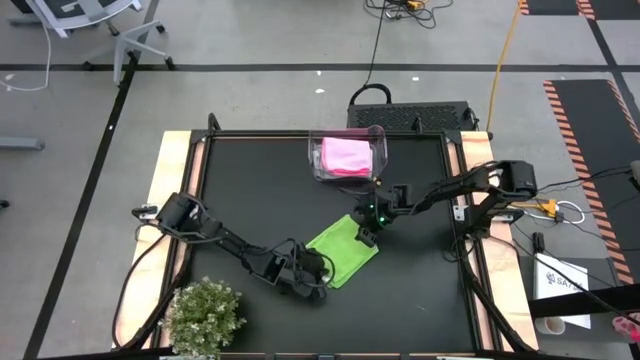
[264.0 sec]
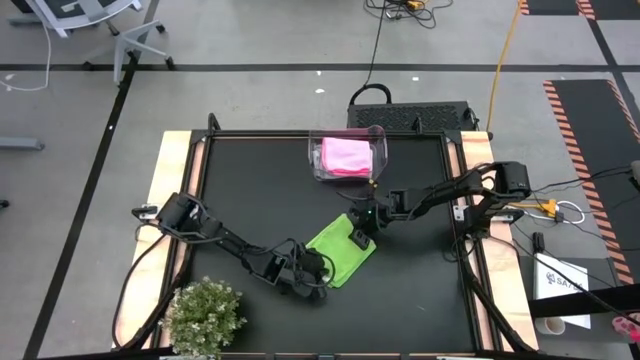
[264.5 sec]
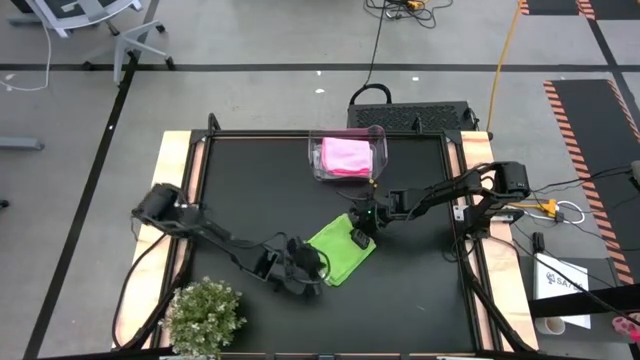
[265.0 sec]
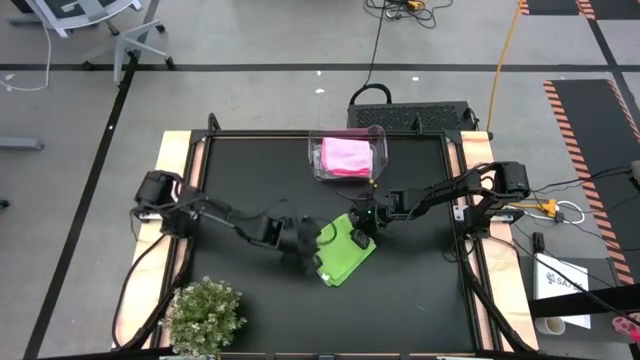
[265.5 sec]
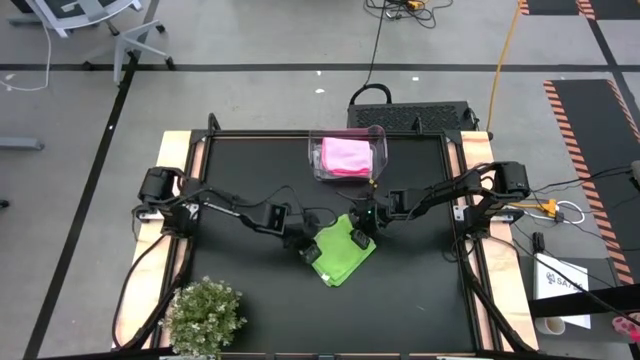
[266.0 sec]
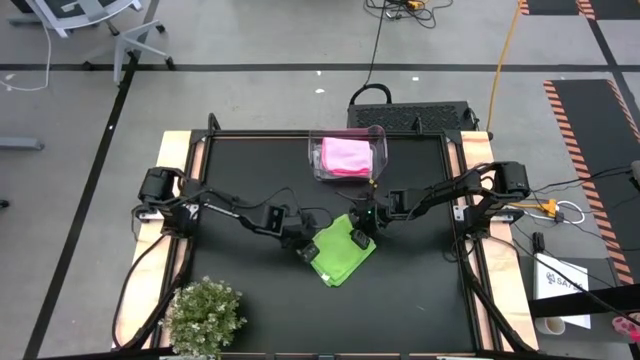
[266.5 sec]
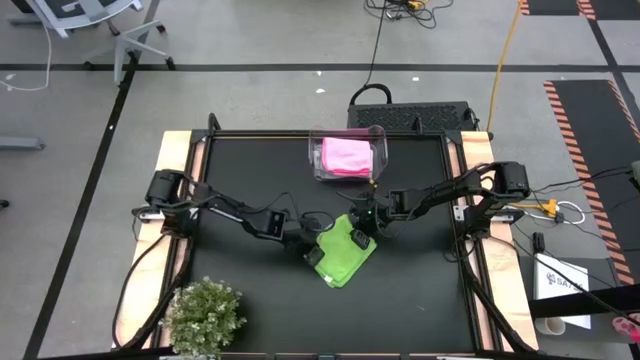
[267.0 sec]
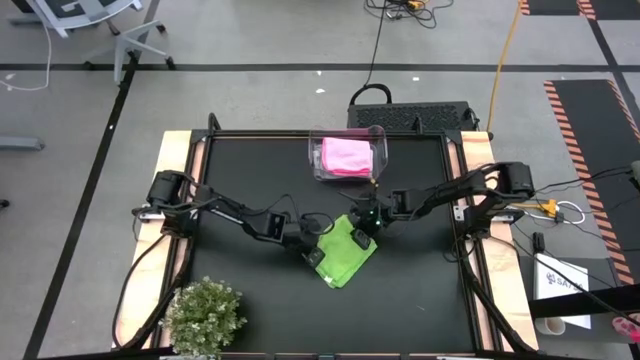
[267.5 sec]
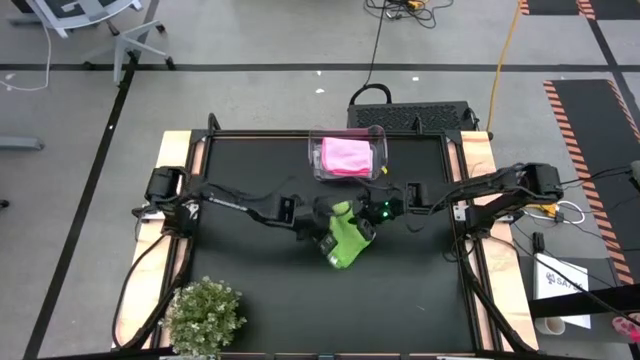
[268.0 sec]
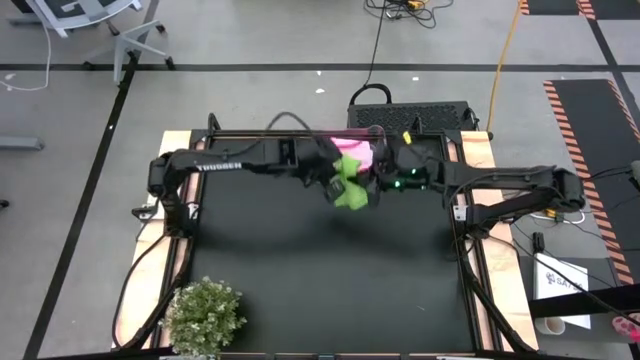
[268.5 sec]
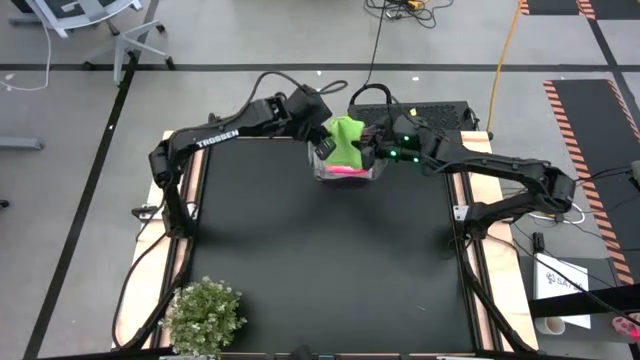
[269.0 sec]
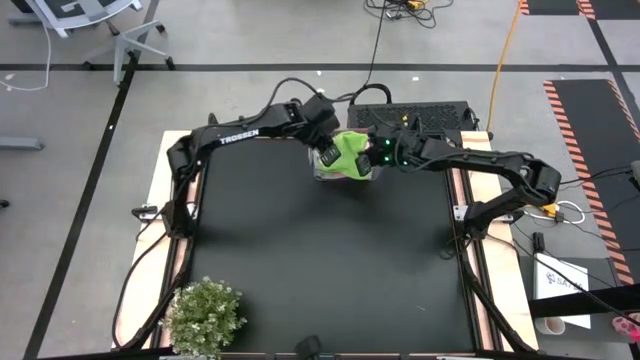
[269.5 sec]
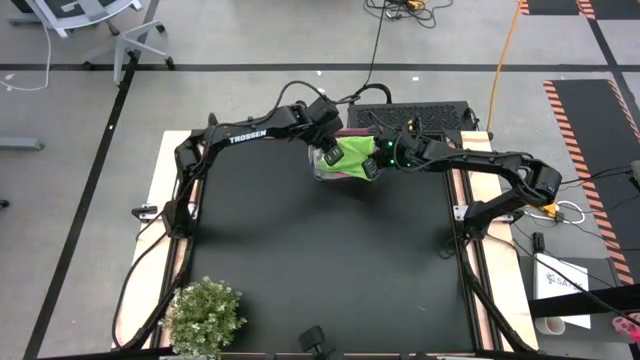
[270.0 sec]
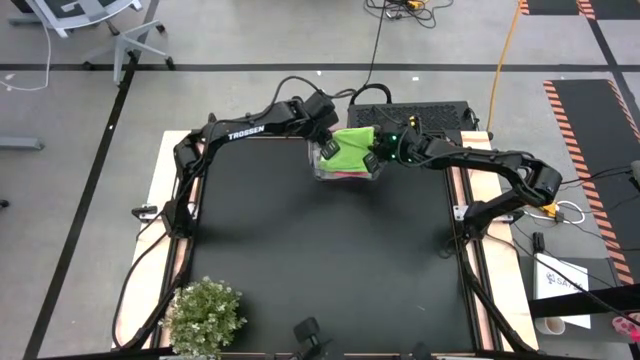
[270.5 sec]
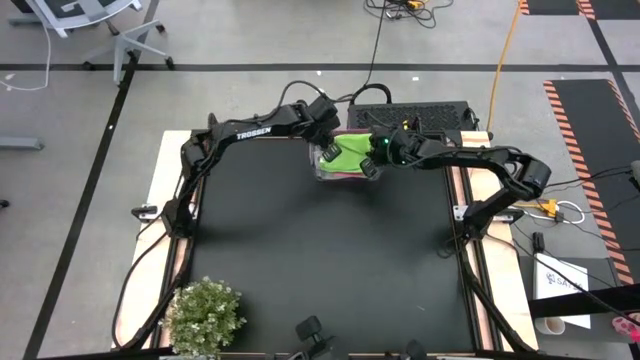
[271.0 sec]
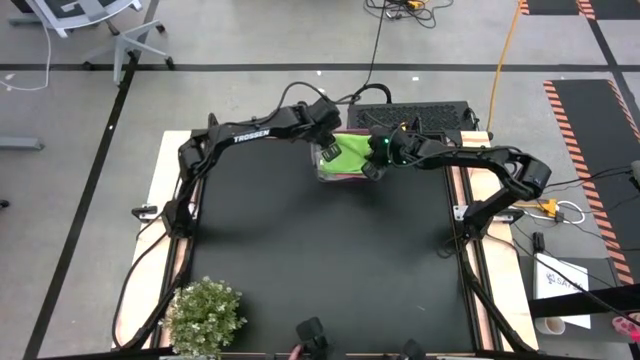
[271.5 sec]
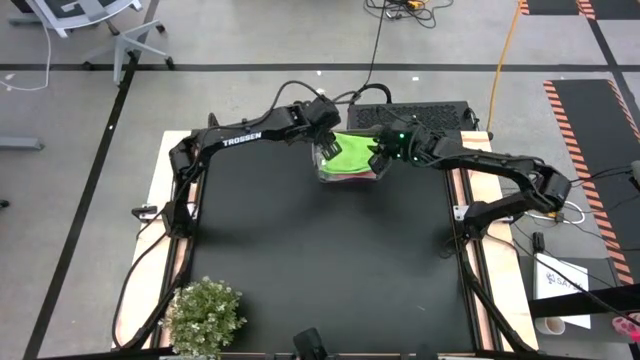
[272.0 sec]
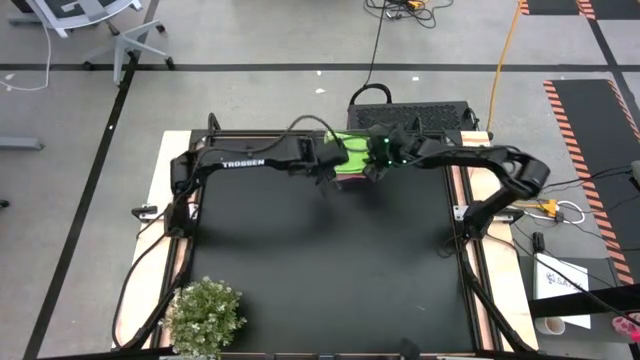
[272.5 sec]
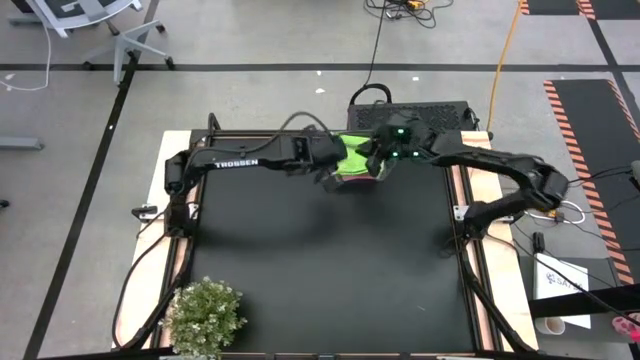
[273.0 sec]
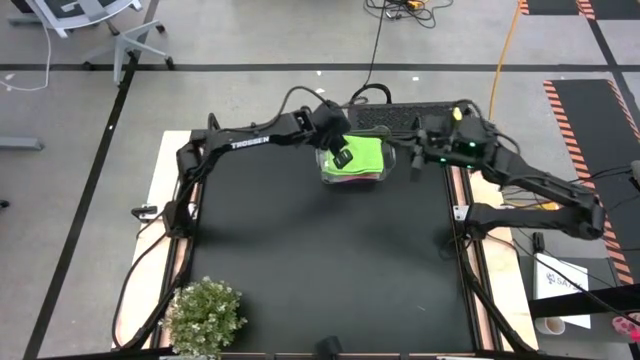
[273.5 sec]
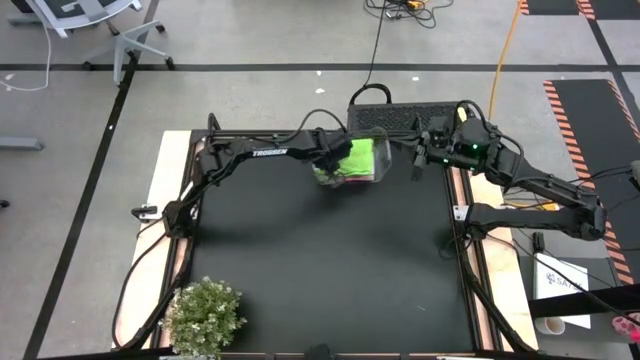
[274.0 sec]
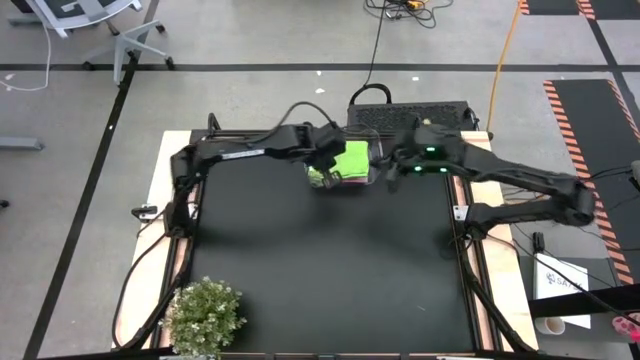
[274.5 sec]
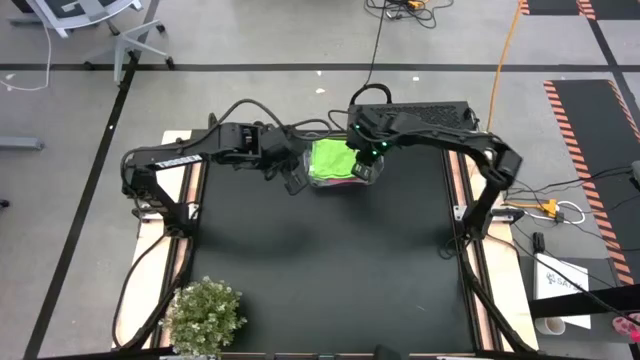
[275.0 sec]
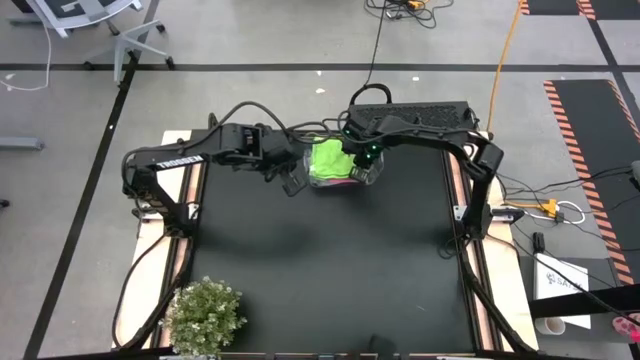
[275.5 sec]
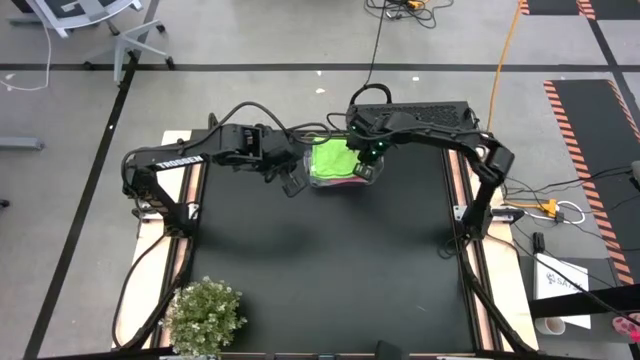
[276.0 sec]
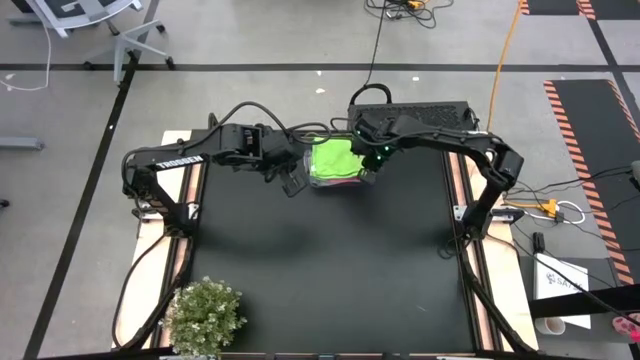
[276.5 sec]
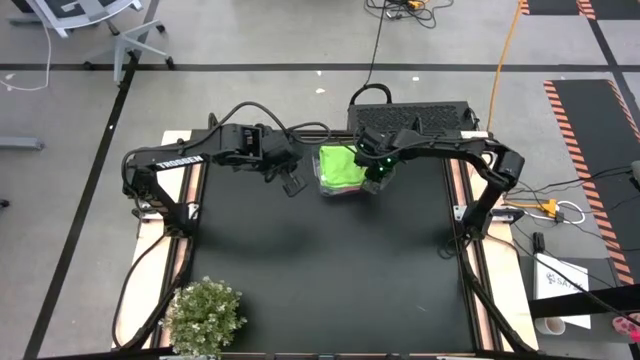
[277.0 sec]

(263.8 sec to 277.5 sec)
Task: Fold microfiber towels
Stack the folded green microfiber cloth on top of the pink microfiber cloth in the transparent bin

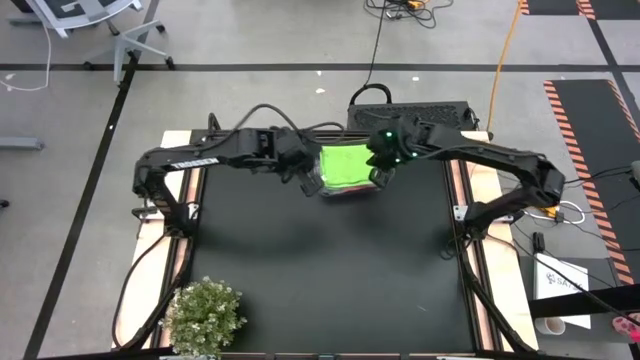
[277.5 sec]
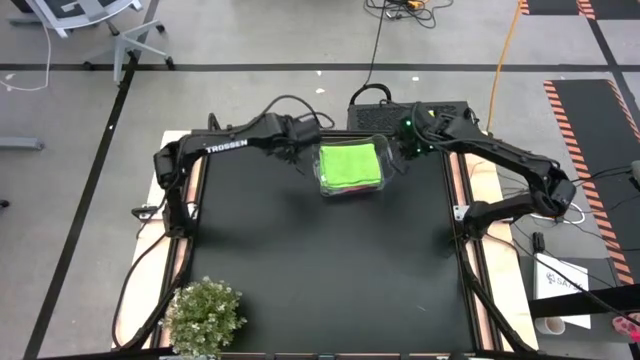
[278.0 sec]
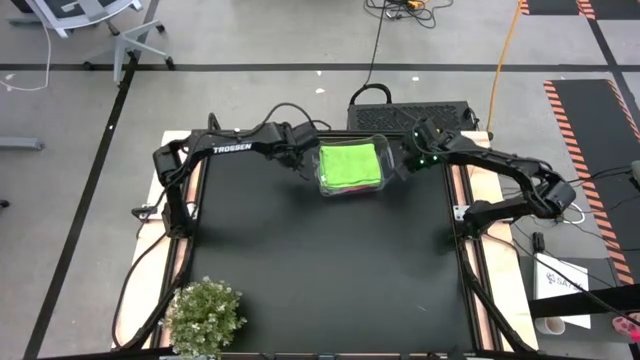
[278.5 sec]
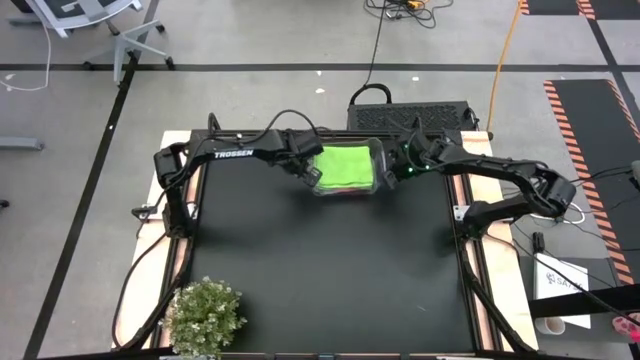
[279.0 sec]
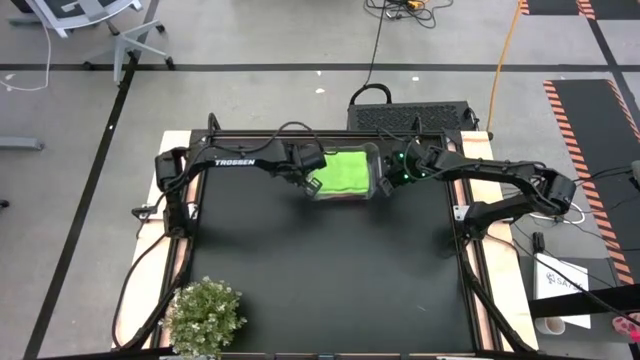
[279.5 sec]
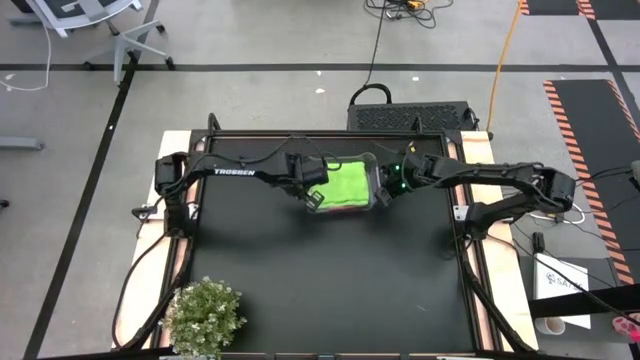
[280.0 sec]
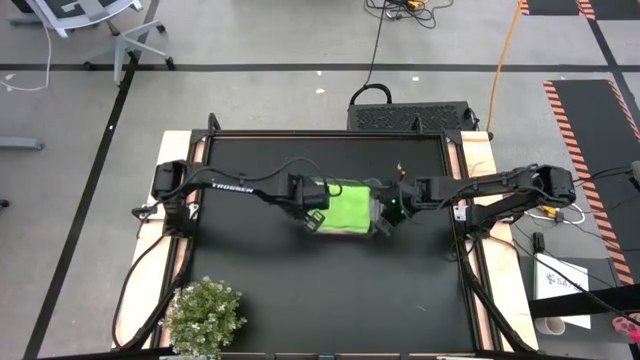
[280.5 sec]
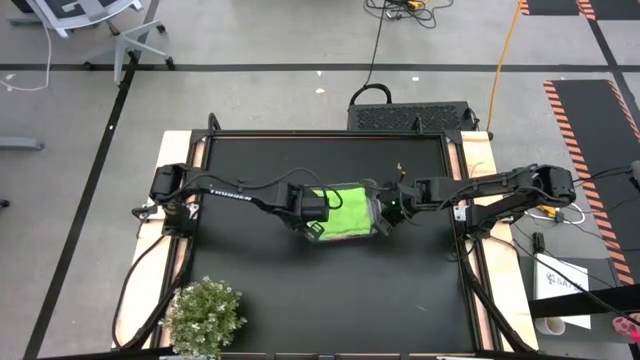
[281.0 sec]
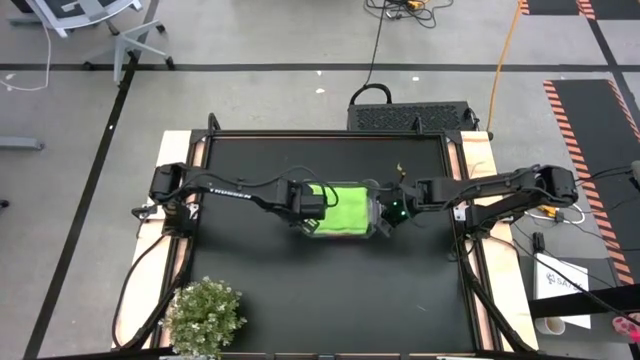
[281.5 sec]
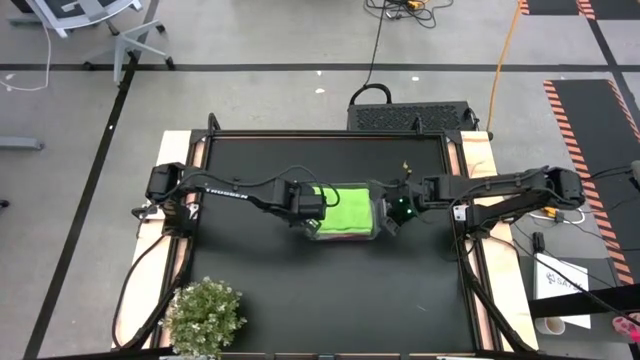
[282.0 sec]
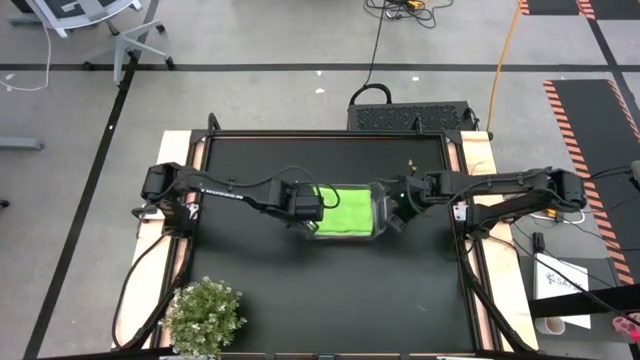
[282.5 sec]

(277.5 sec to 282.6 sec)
Move the transparent bin to the center of the table

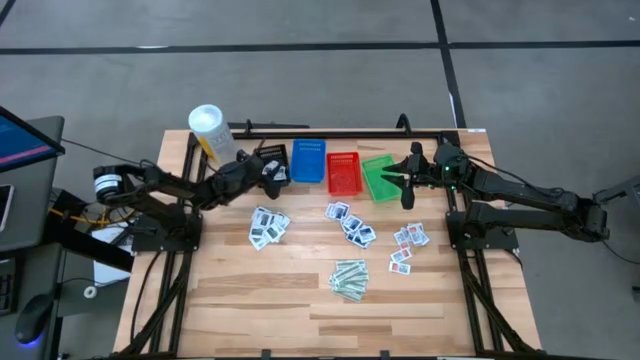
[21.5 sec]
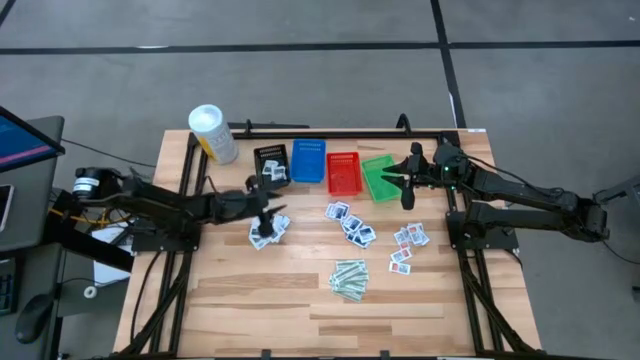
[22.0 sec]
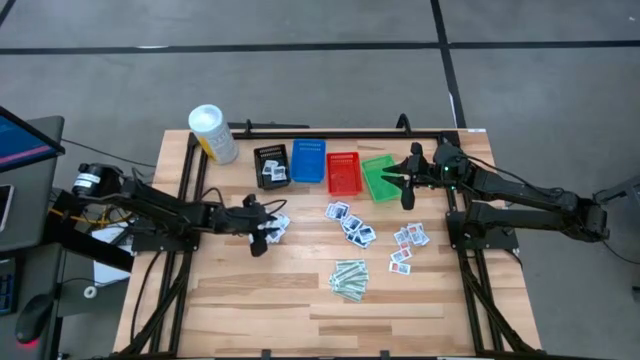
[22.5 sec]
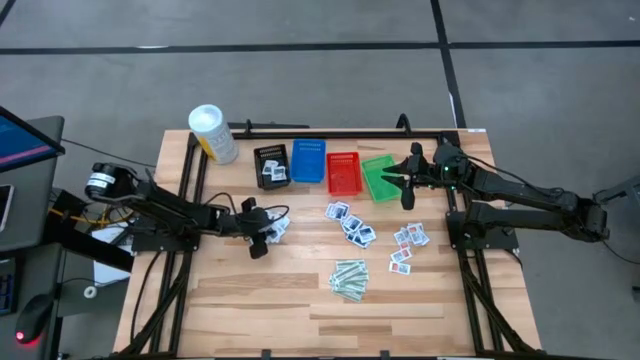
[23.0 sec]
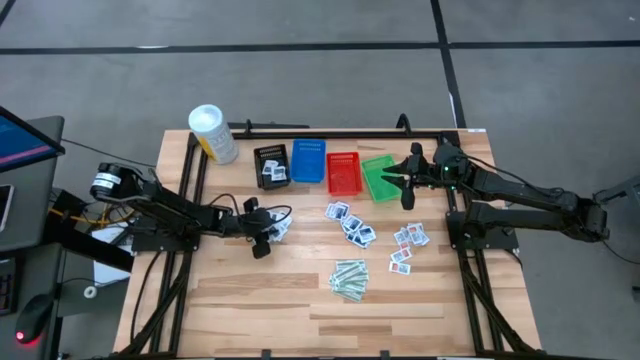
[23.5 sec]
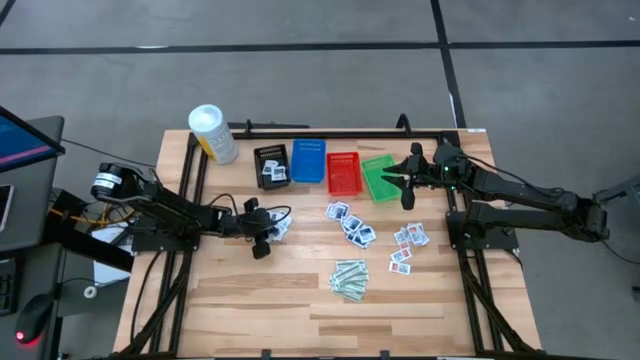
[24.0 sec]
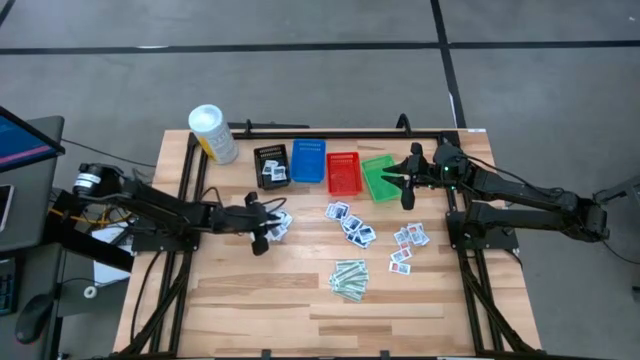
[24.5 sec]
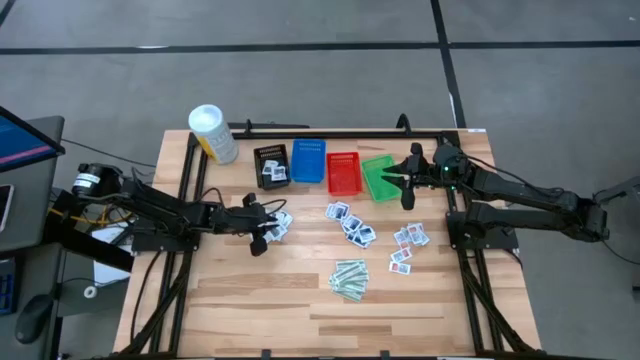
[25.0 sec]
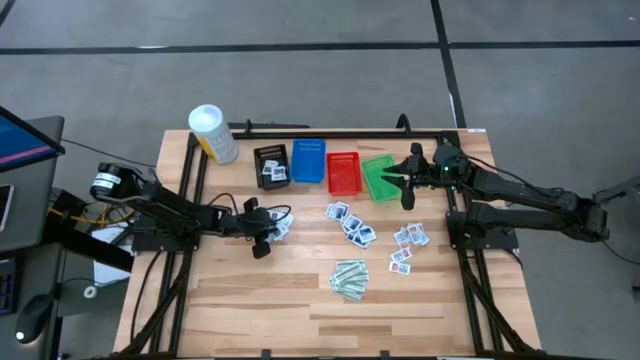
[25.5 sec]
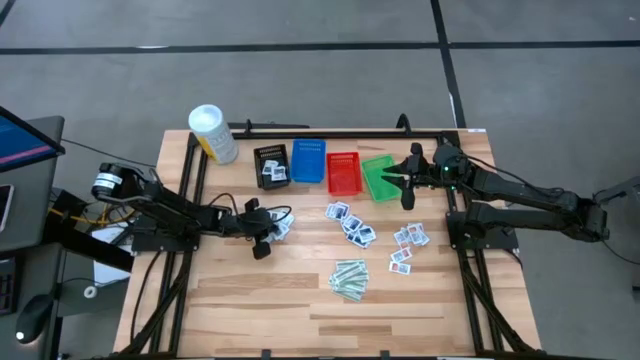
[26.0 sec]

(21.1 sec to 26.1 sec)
Task: Pick & Place First Aid Supplies
Put the gray pad into the black bin
